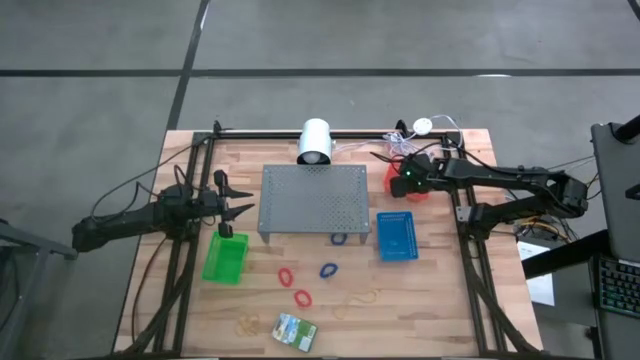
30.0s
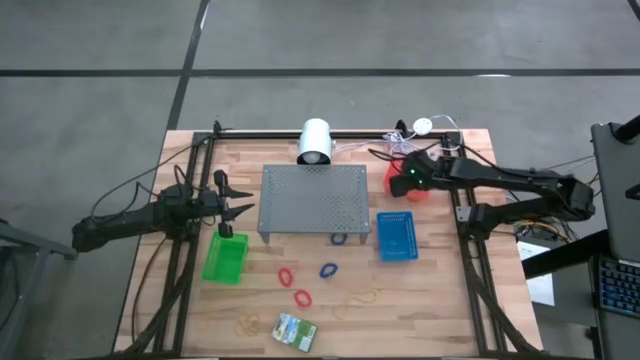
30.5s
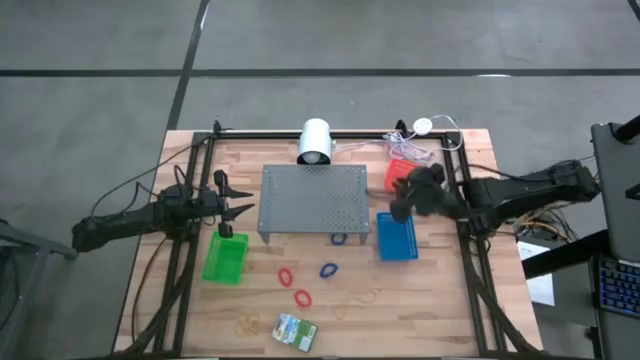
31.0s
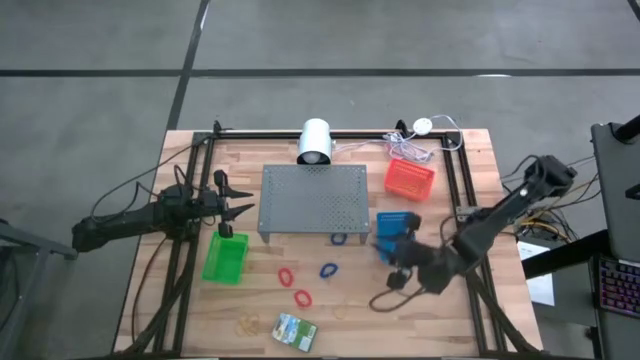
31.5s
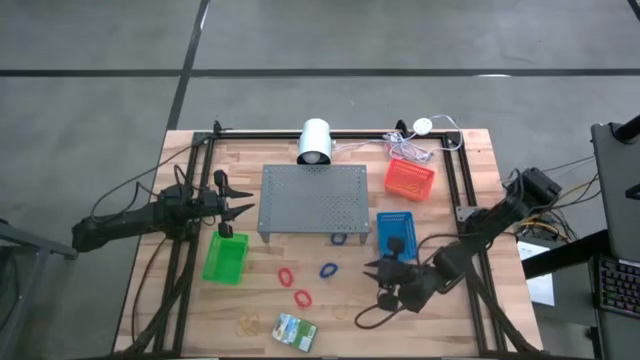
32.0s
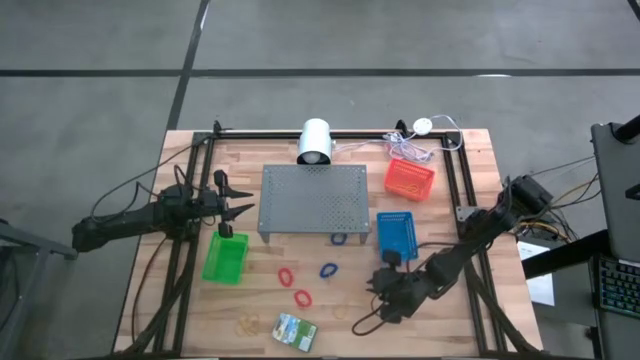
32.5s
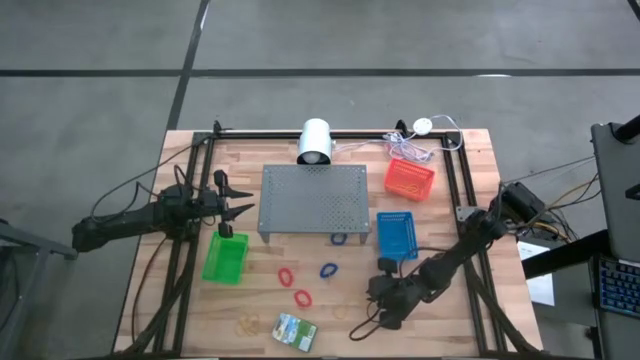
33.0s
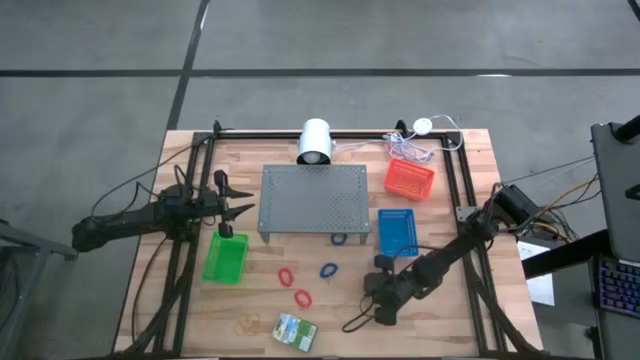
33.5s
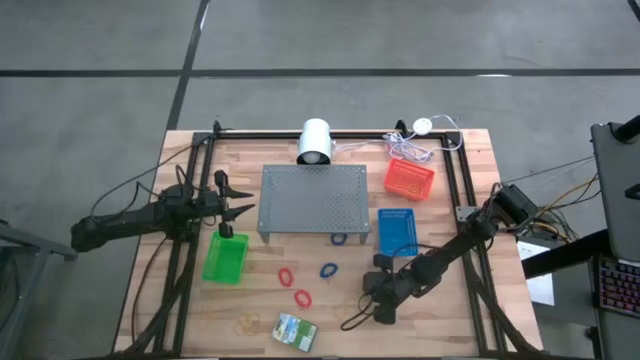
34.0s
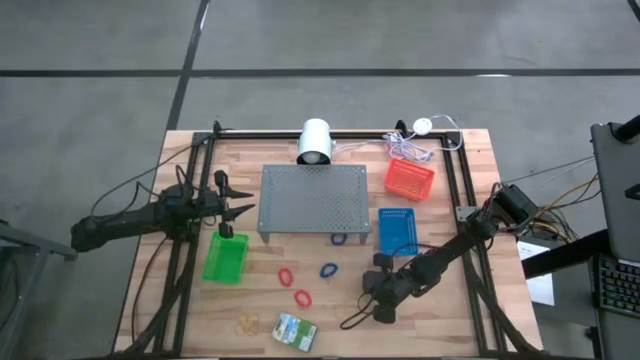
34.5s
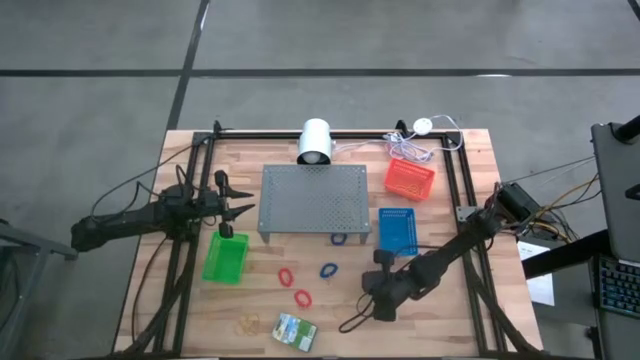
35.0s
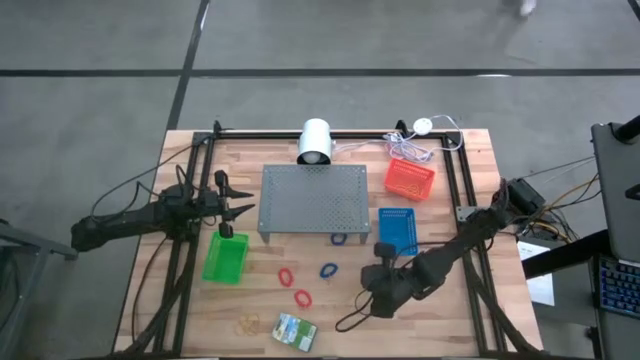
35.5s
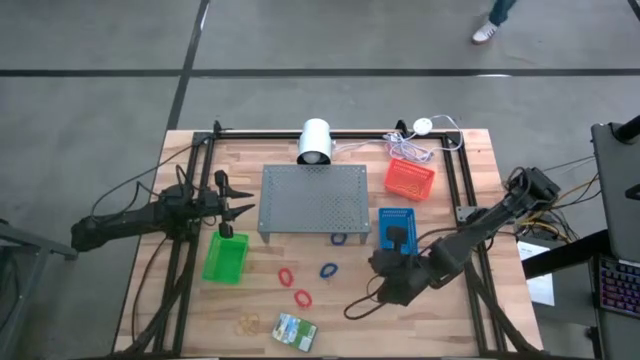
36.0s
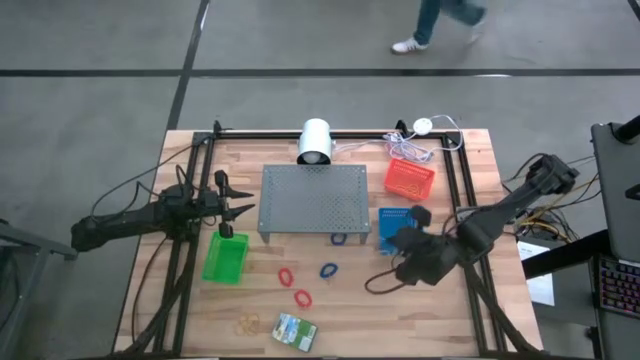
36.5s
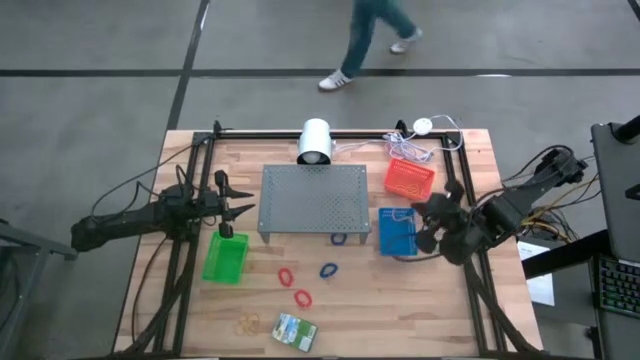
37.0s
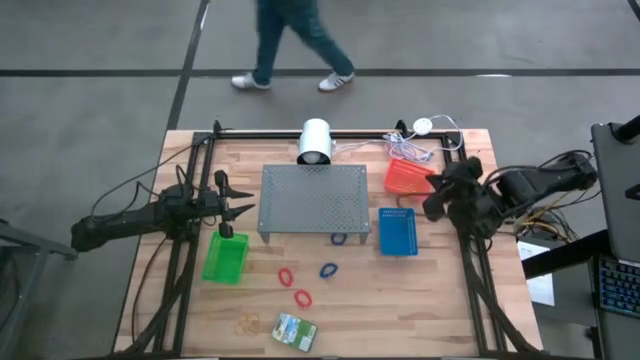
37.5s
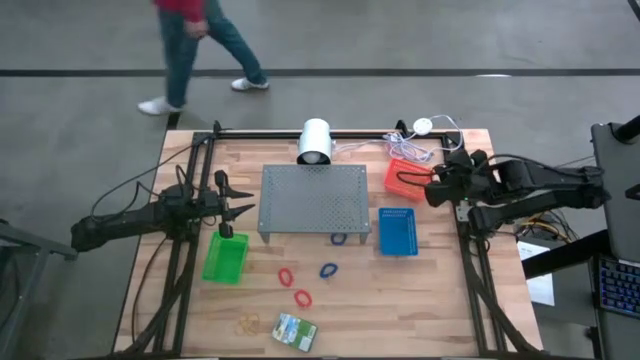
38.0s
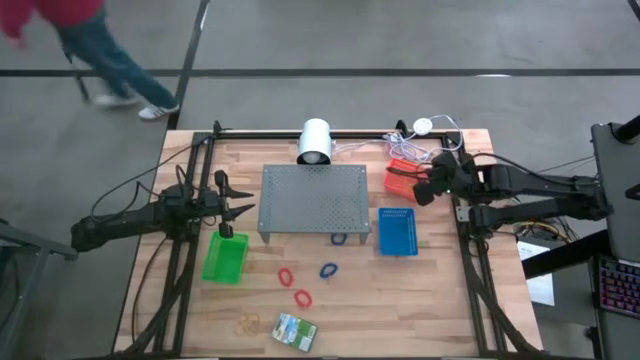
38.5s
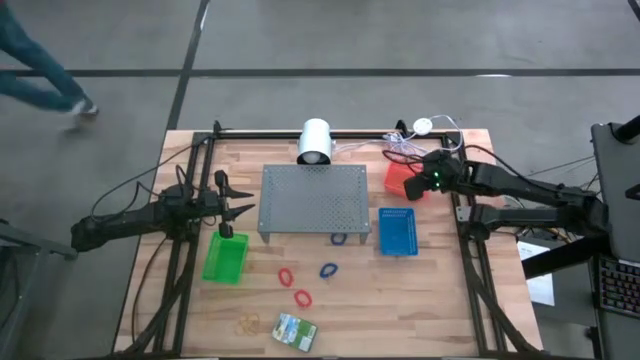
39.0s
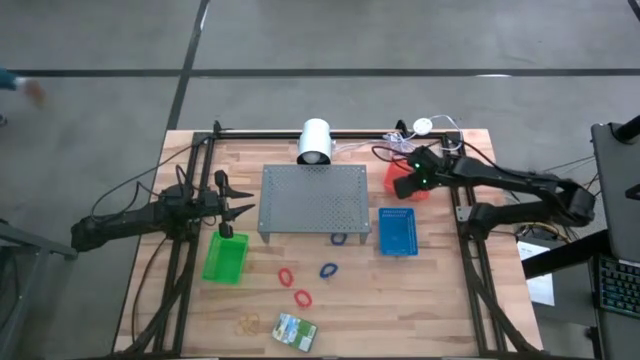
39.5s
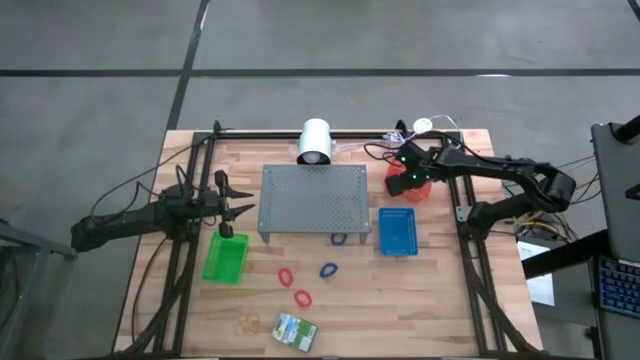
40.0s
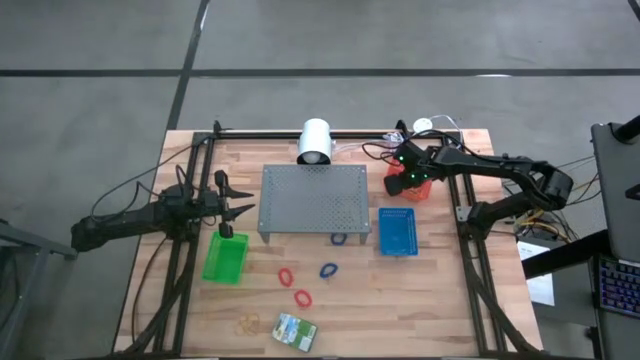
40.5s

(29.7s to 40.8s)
Task: Pick & Place Office Desk Supplies
Put the yellow rubber band into the orange bin

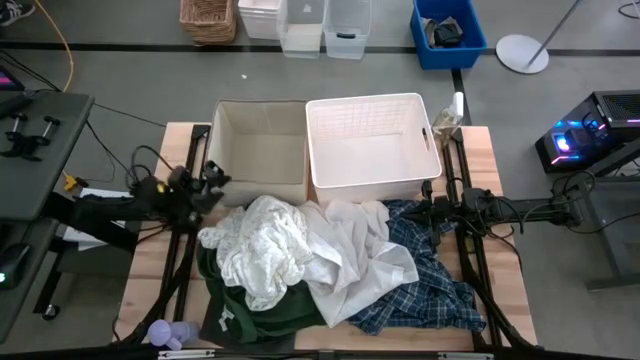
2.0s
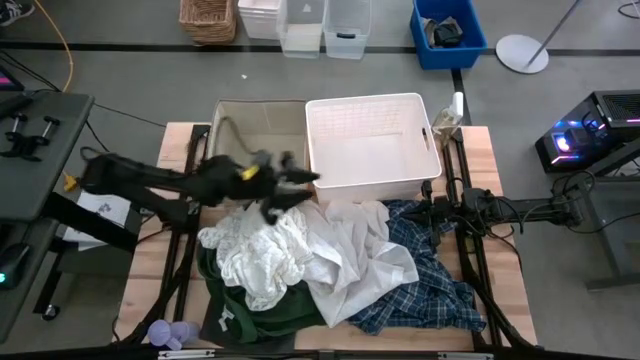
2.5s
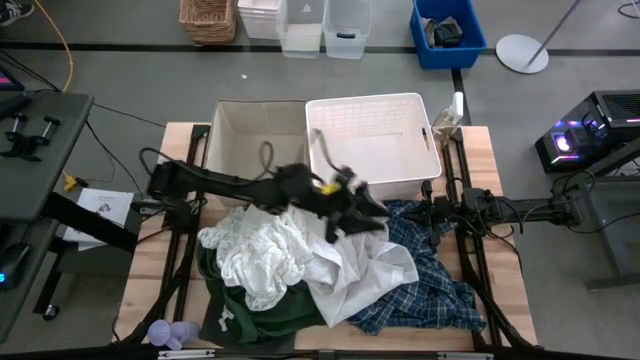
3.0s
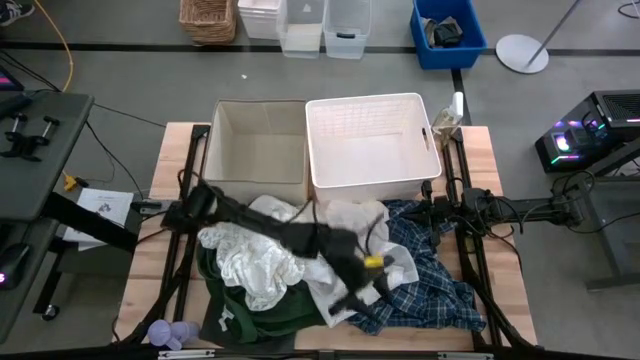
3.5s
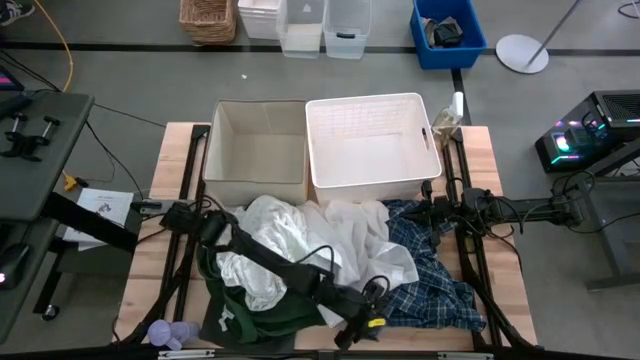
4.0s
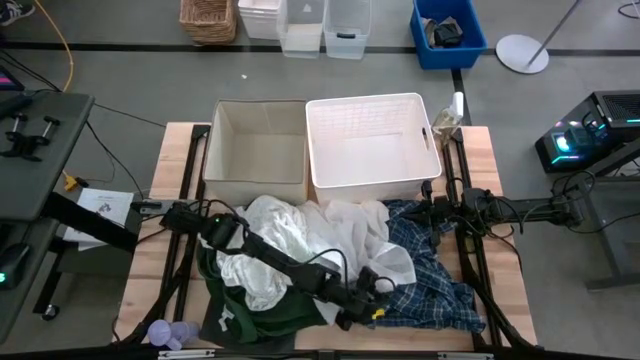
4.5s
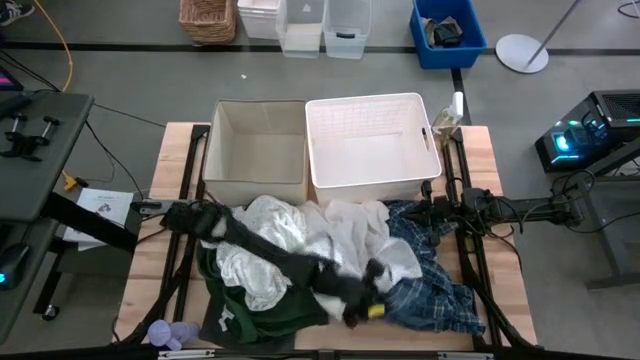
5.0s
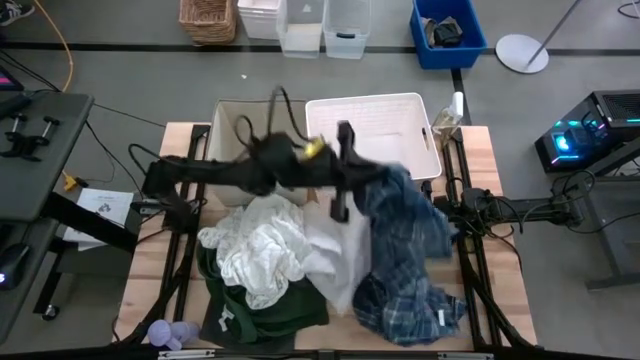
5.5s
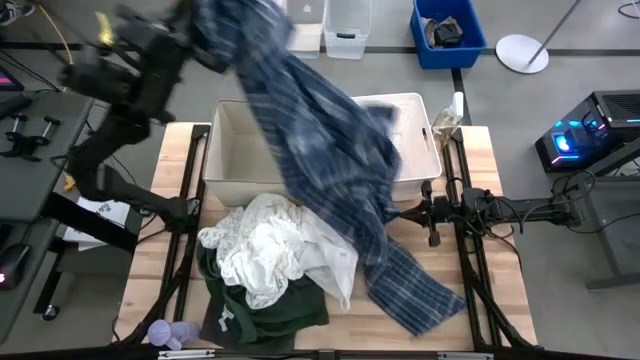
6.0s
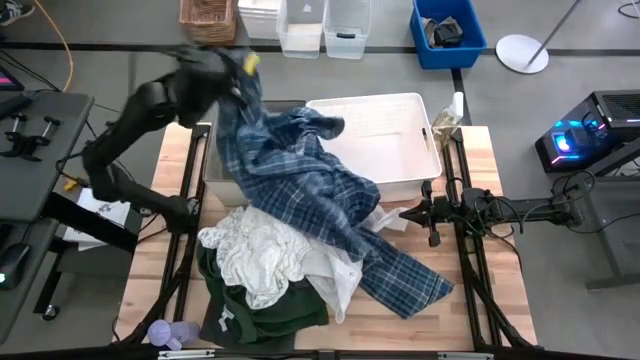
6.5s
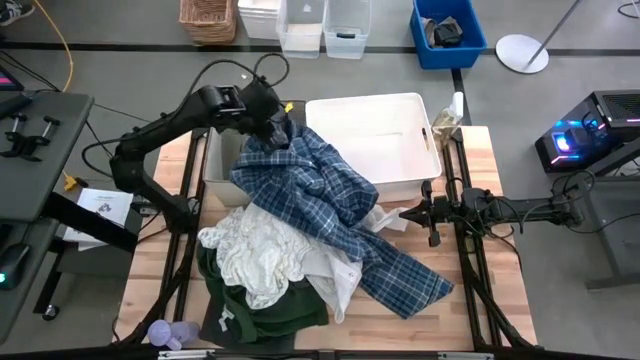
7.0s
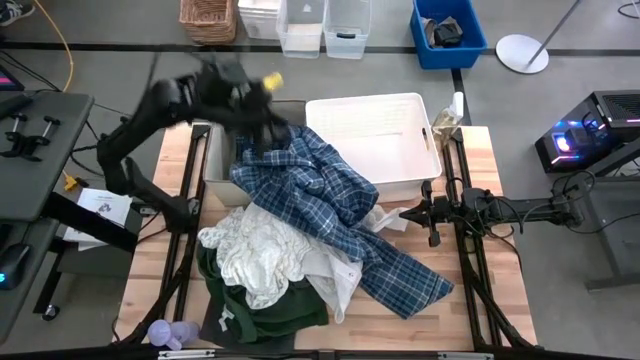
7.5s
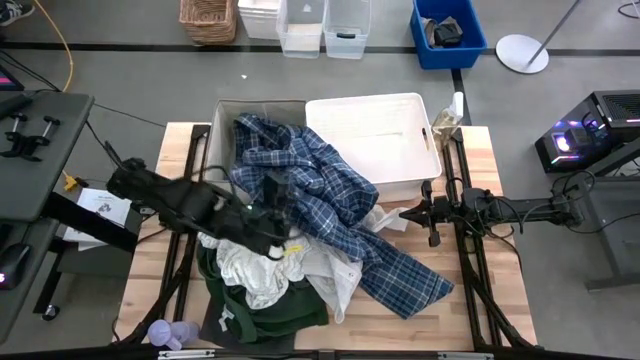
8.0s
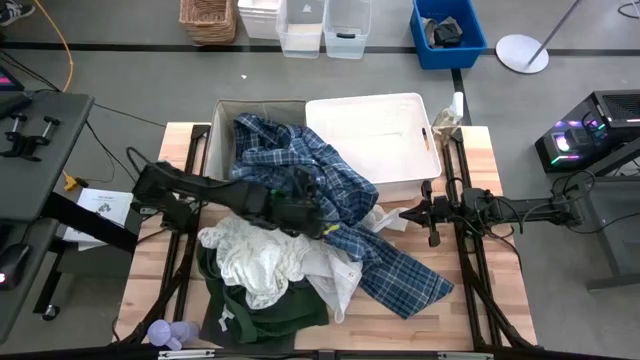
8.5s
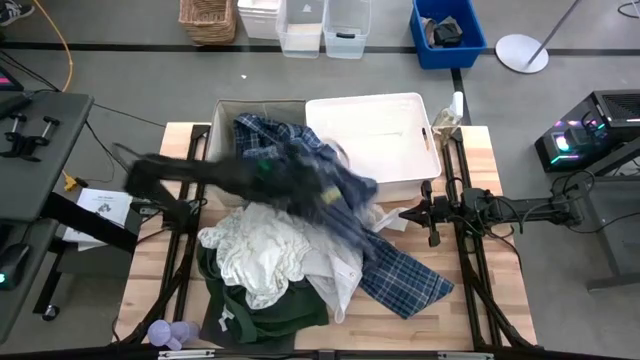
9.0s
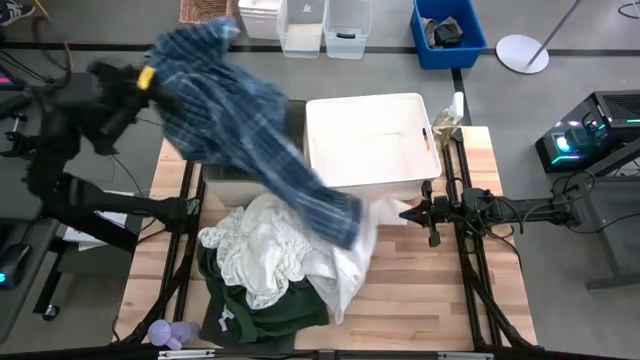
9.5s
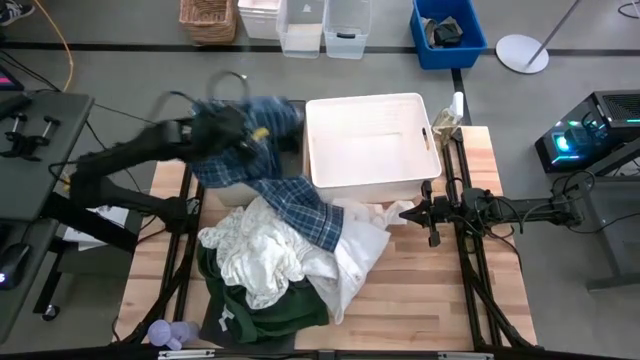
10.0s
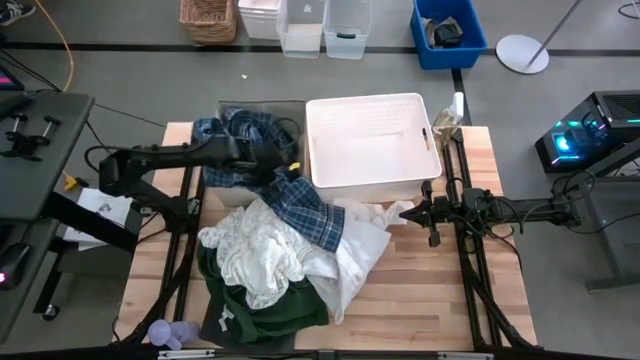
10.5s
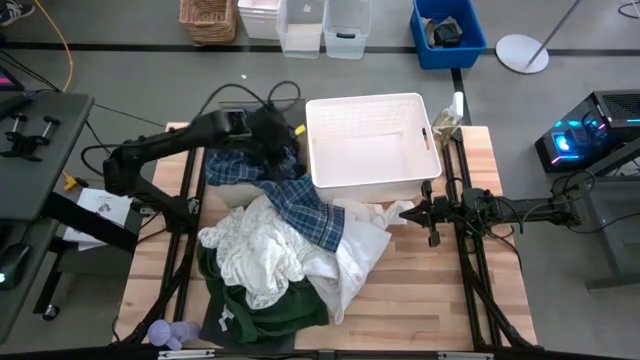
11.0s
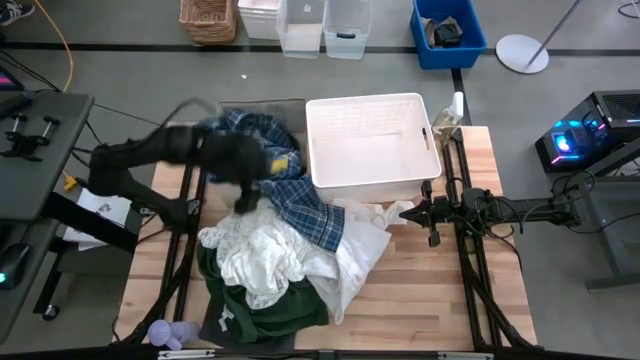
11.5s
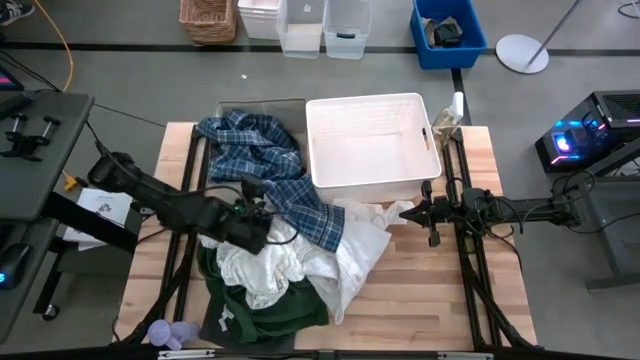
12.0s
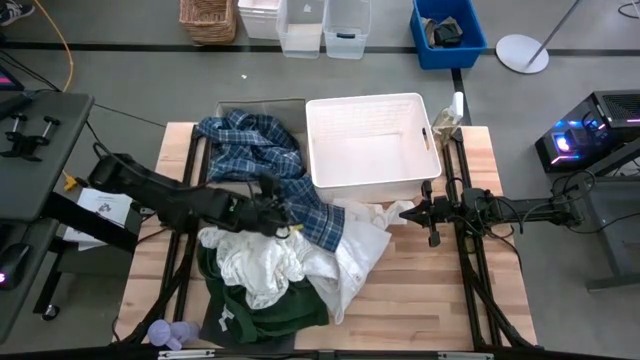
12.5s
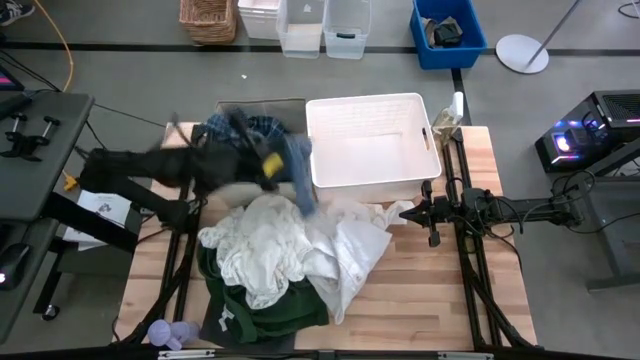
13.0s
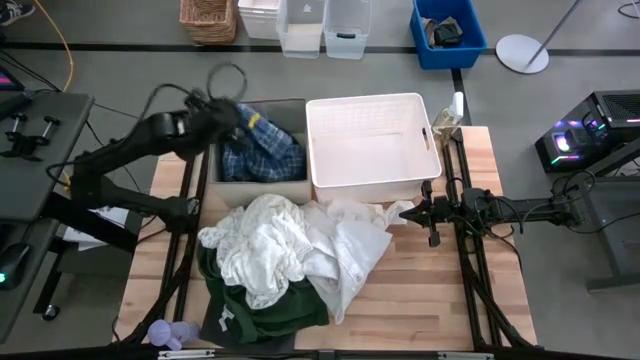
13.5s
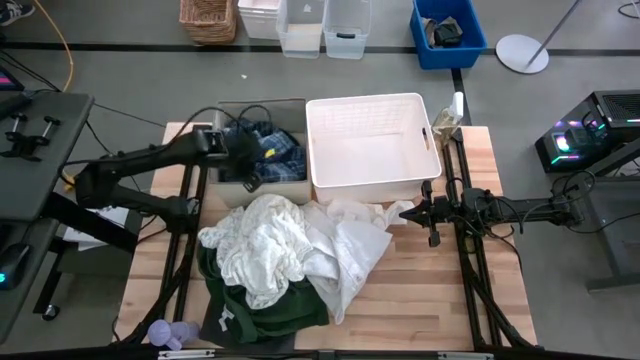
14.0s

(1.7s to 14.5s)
Task: Sort clothes
Put the blue cloth into the laundry organizer
